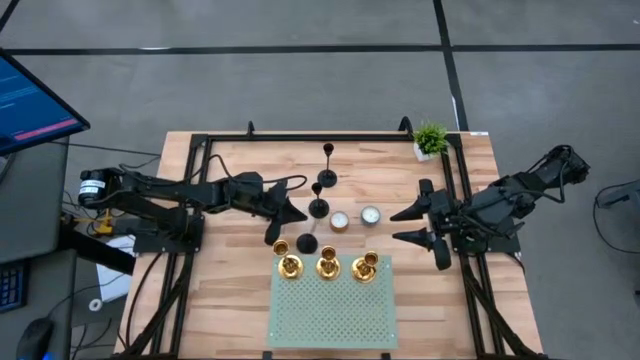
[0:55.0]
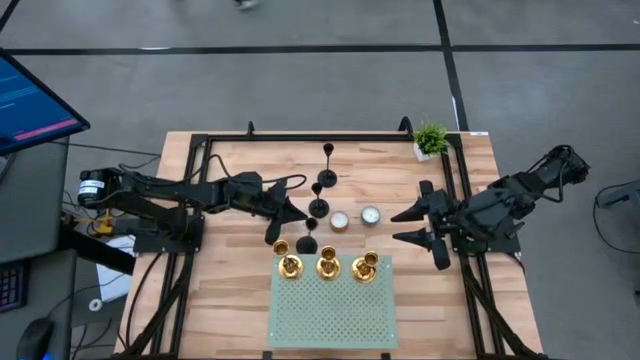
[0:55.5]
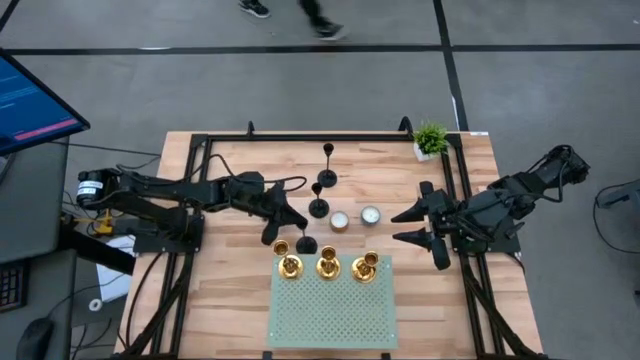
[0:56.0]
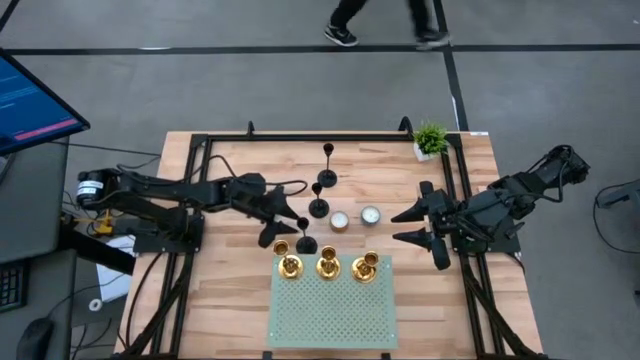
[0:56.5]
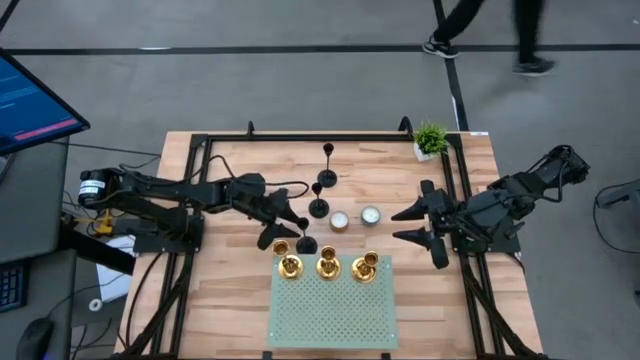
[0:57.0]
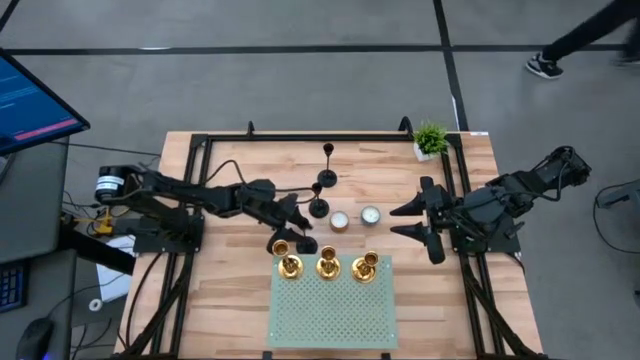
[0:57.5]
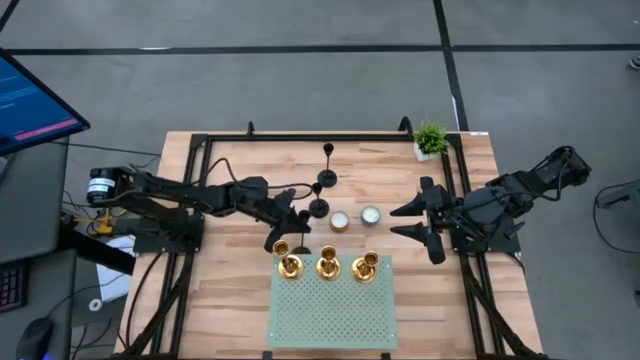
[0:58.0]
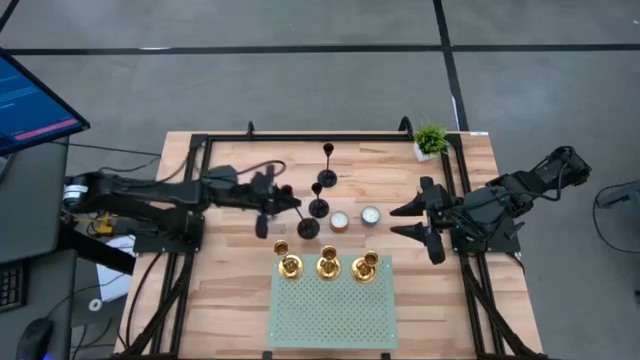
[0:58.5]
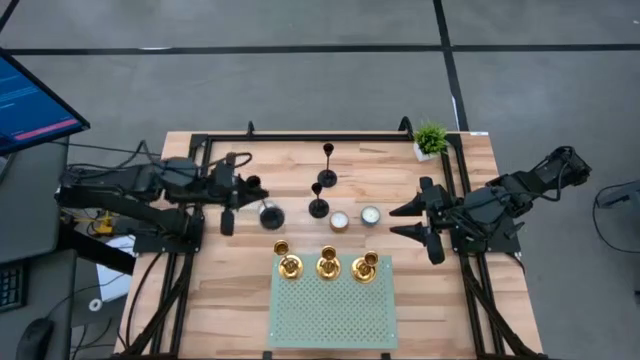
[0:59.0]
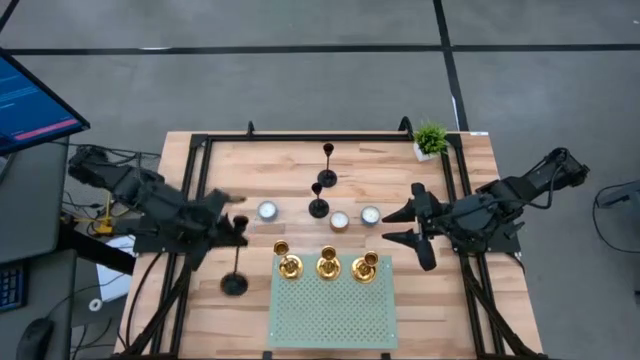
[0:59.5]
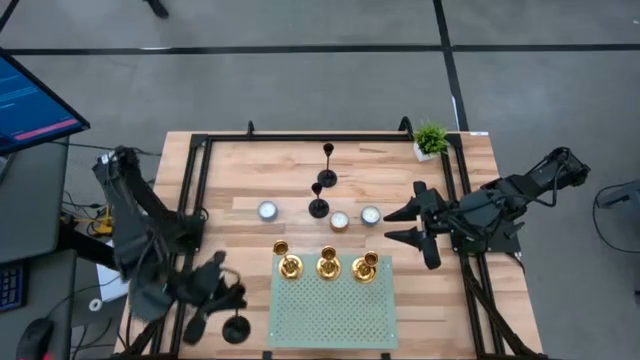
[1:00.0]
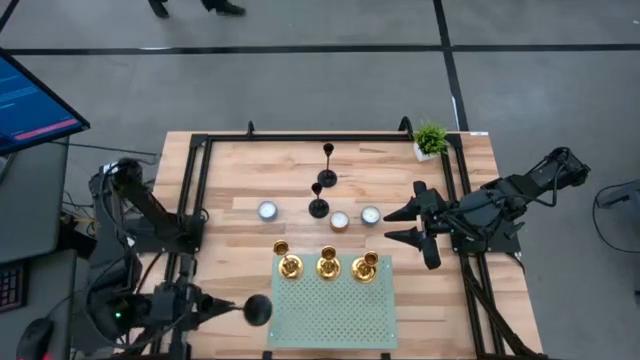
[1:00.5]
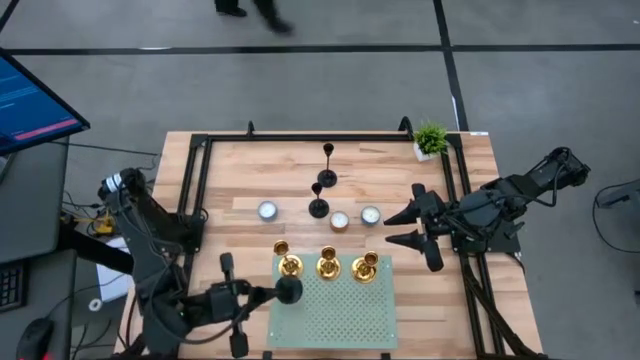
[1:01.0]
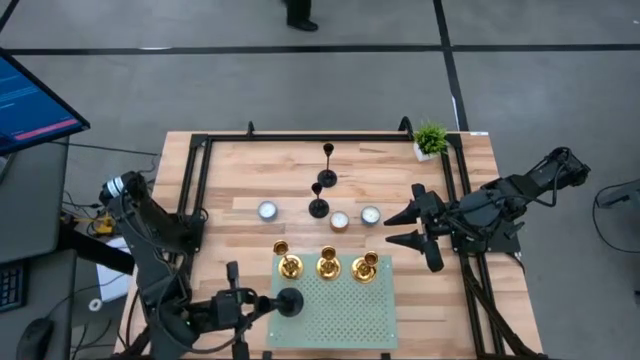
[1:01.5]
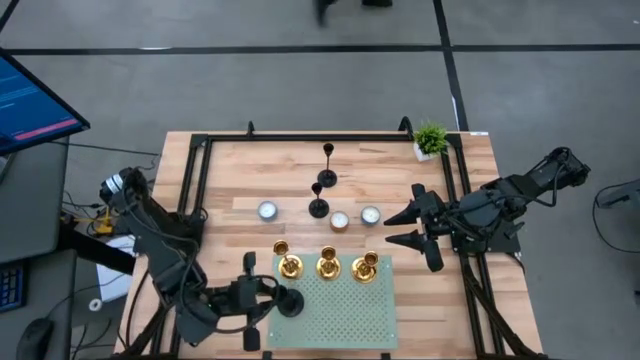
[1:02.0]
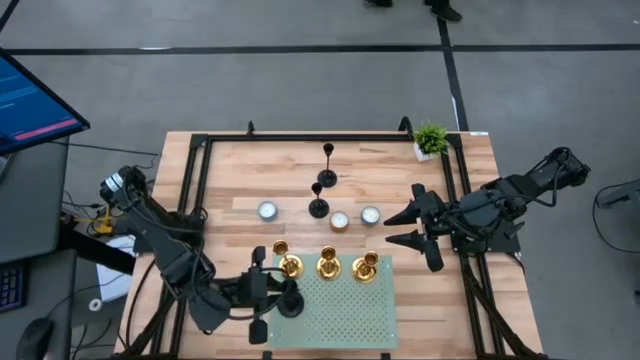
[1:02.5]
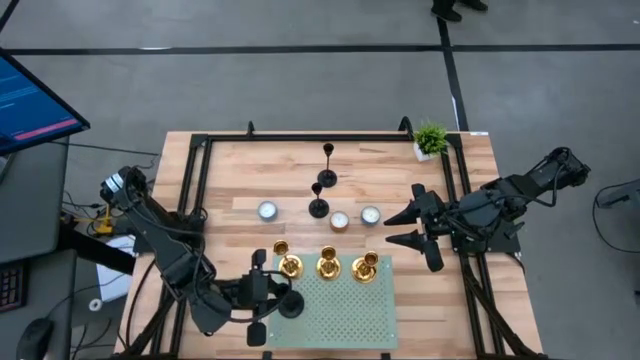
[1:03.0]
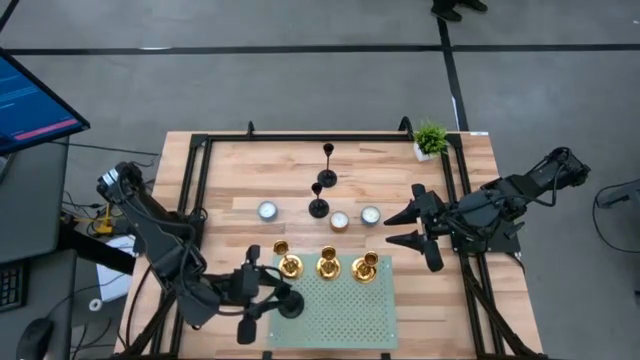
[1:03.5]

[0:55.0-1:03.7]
Task: Pick & Place candle stick holders
Put the bottom black candle holder on the shelf

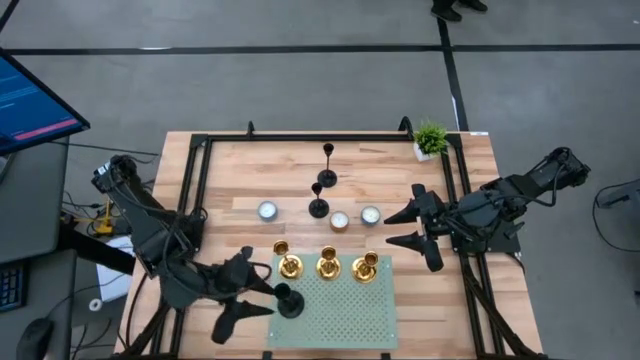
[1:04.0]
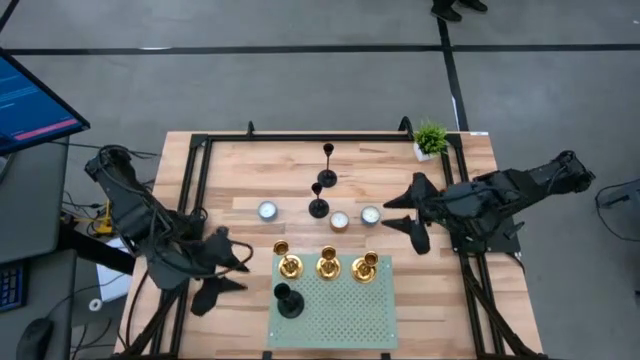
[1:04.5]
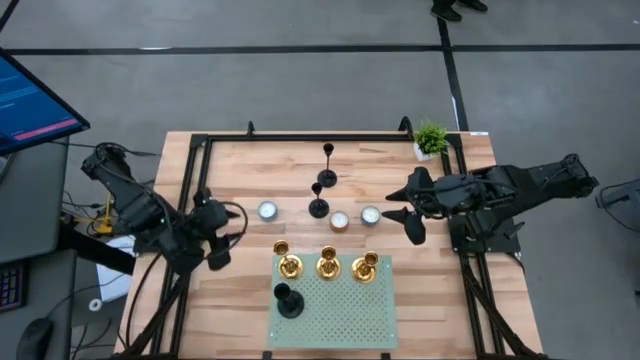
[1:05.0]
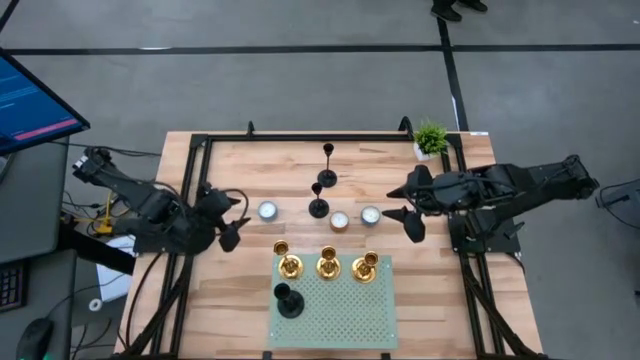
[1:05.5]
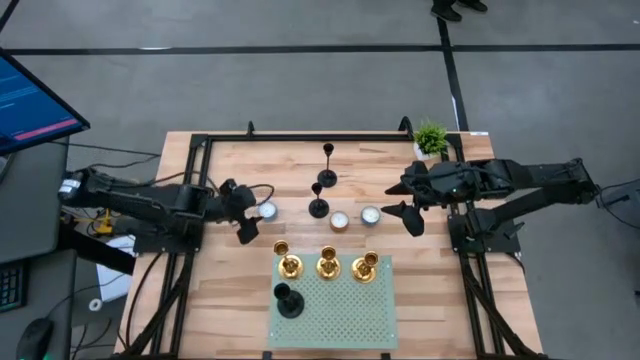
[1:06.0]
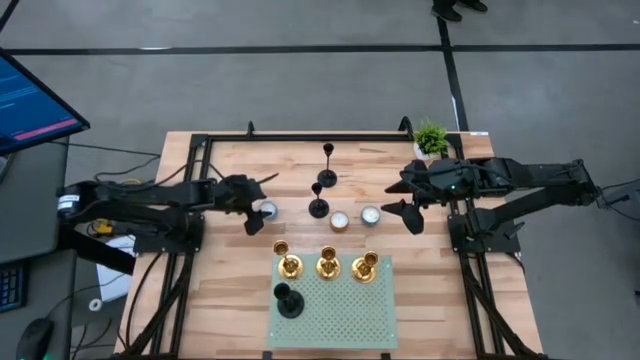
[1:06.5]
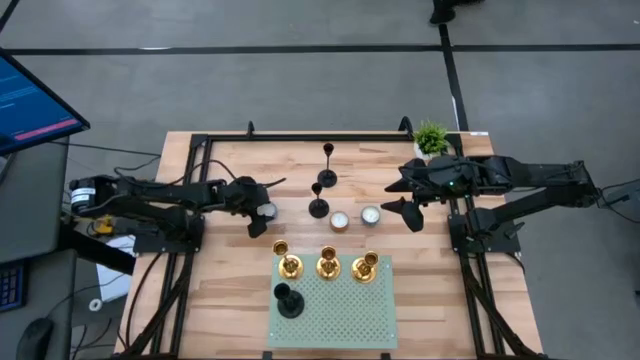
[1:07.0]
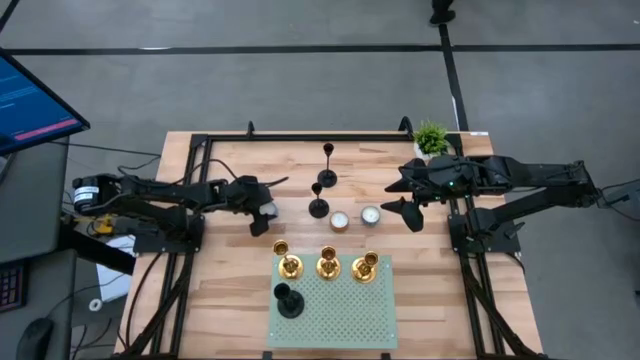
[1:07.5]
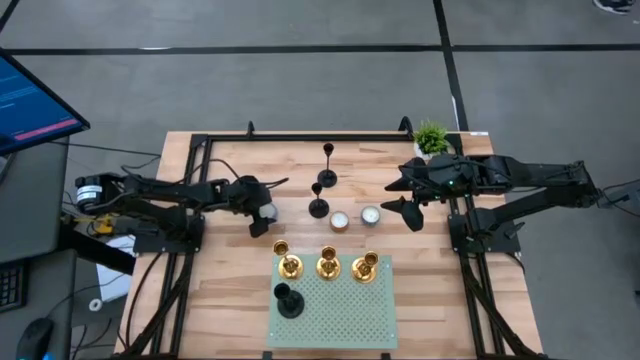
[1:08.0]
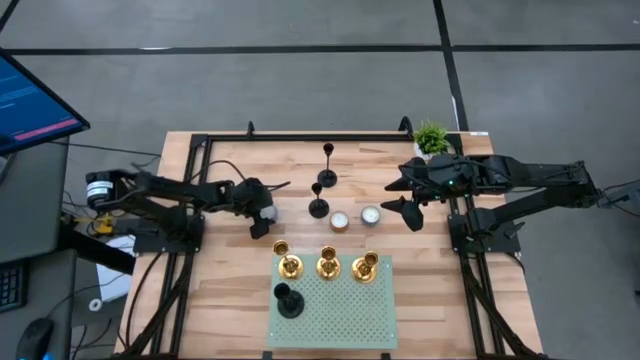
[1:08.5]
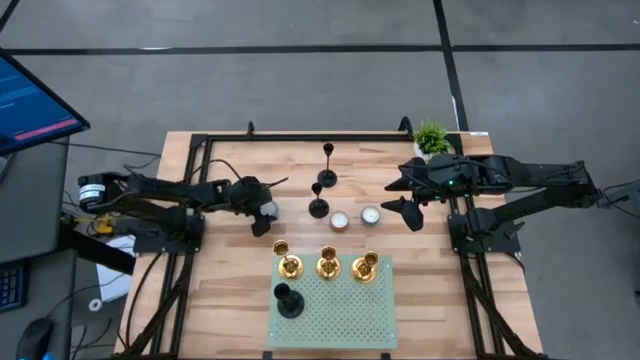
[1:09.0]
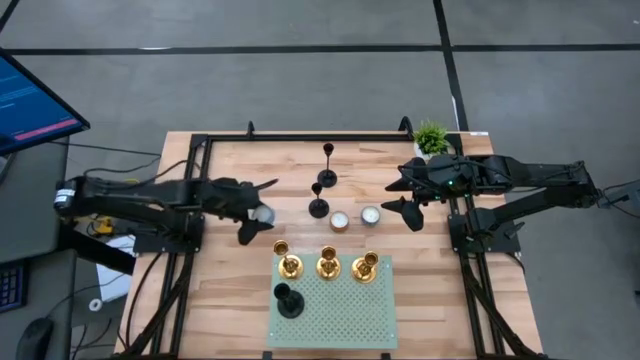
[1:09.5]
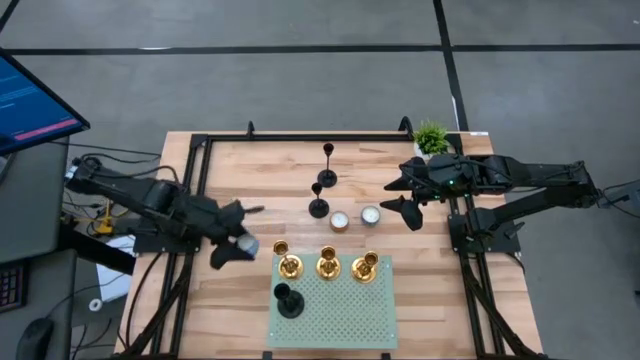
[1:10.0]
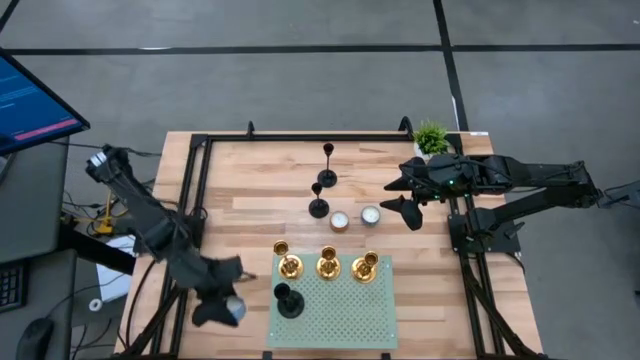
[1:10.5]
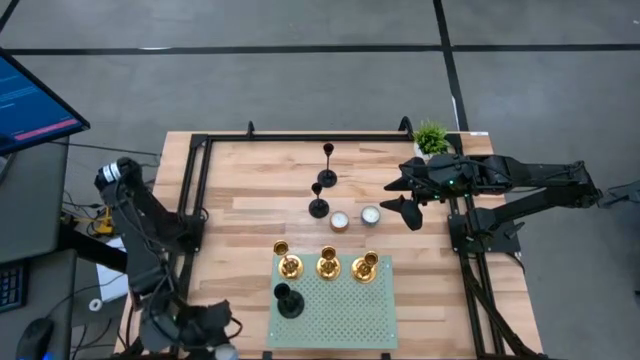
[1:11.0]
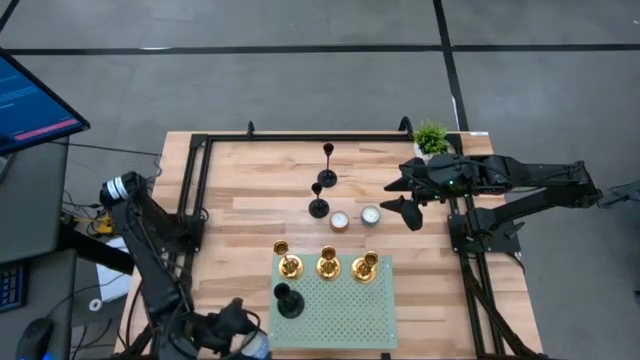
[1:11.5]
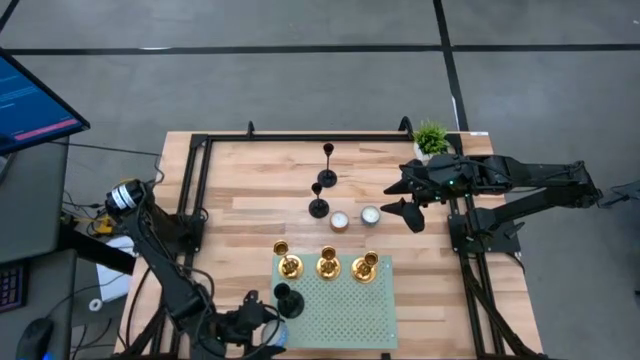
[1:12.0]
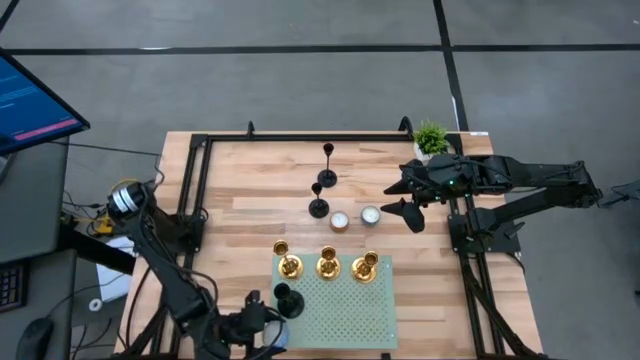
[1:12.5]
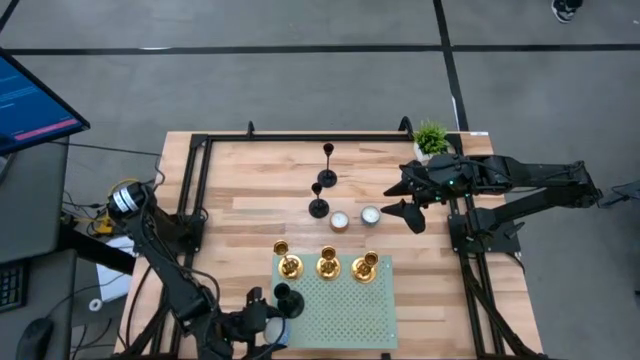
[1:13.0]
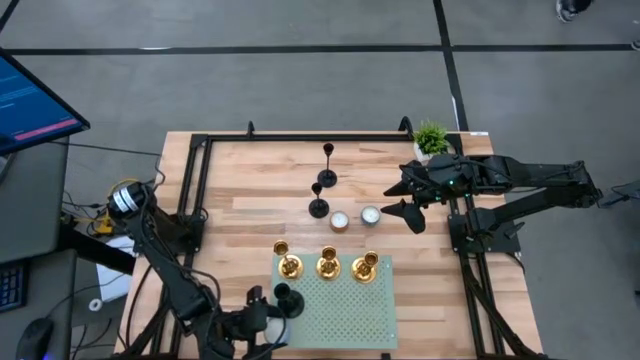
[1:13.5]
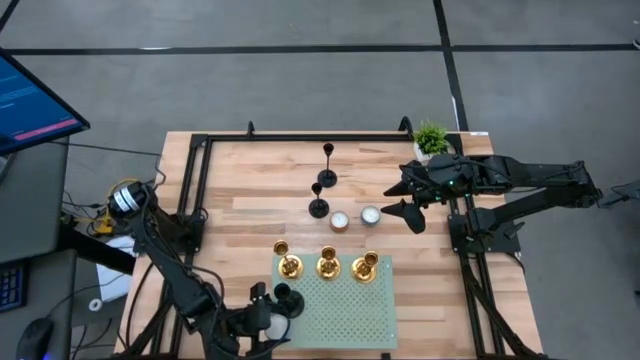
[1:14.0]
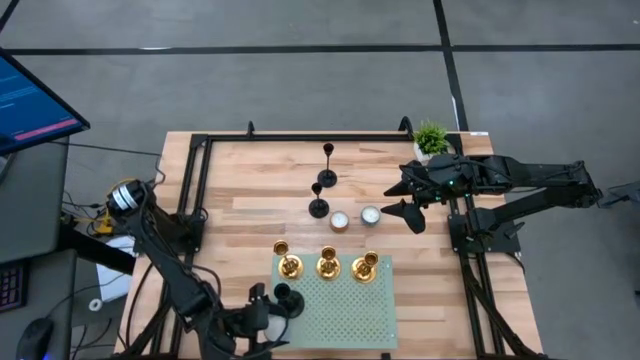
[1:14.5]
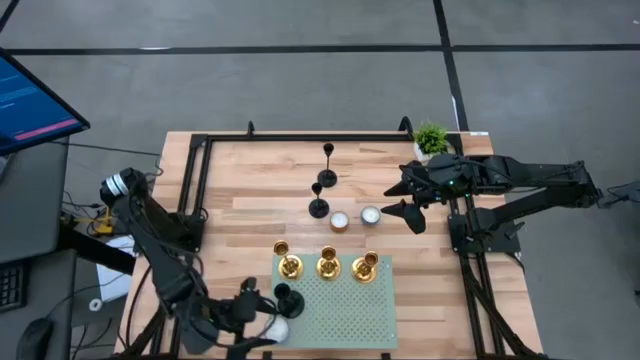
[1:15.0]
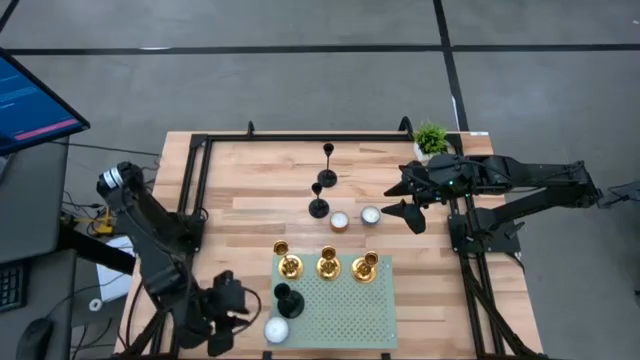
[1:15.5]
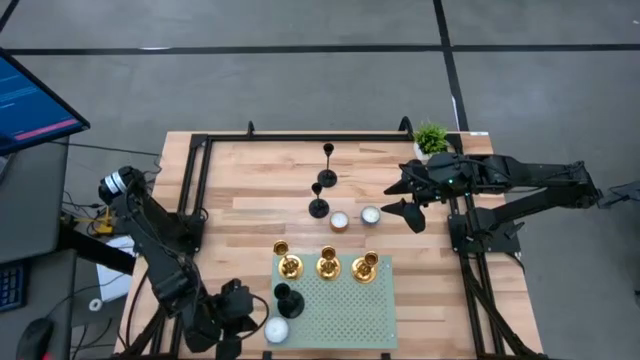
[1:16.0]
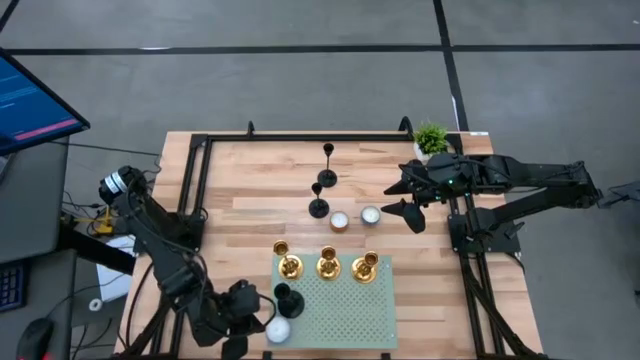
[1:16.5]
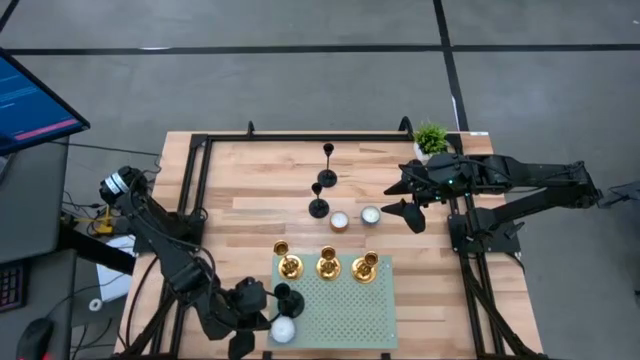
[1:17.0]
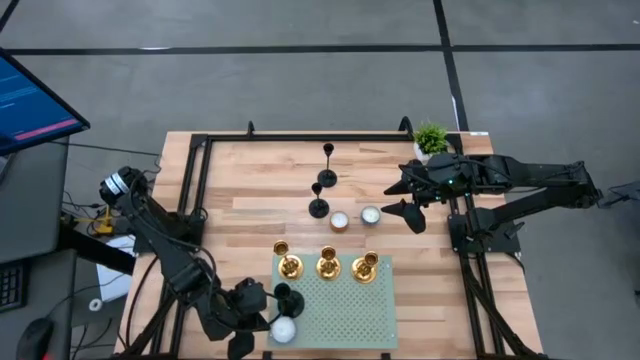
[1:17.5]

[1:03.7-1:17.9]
Put the left blue scented candle on the shelf
